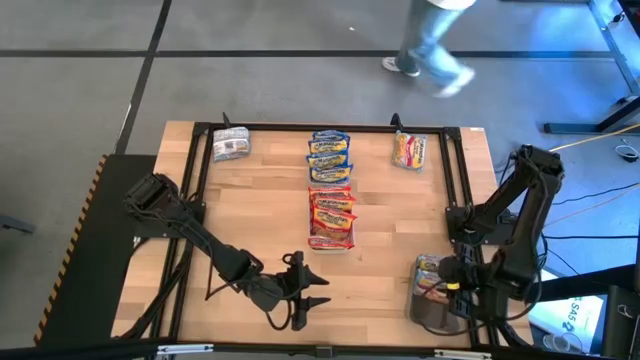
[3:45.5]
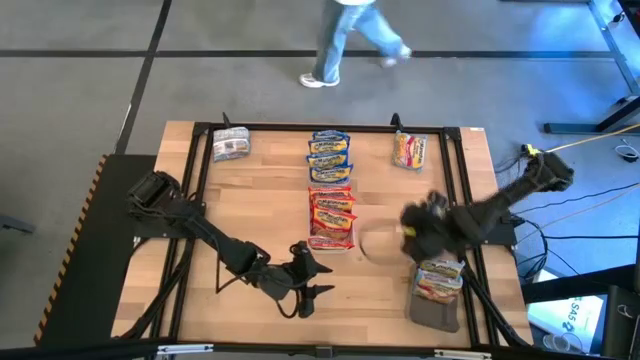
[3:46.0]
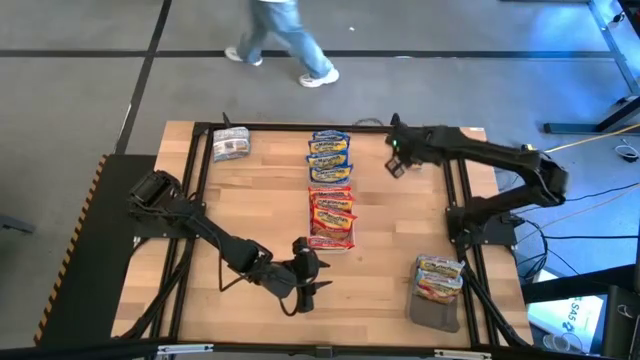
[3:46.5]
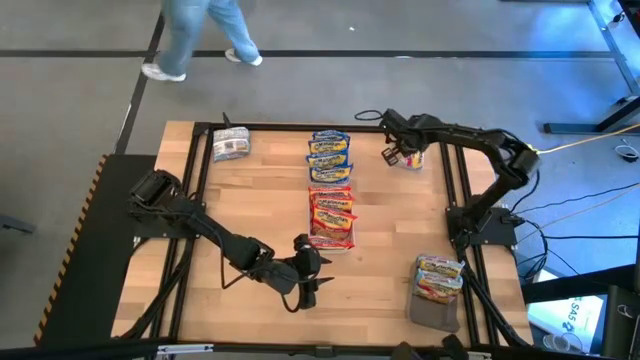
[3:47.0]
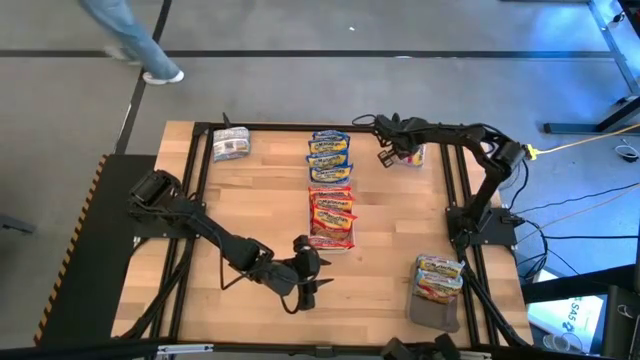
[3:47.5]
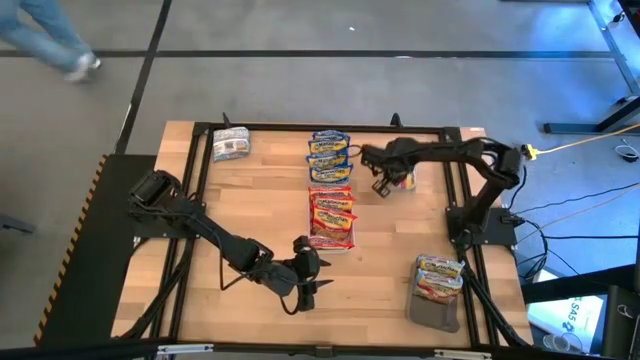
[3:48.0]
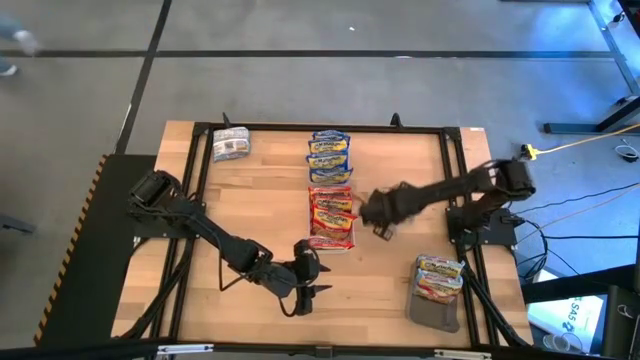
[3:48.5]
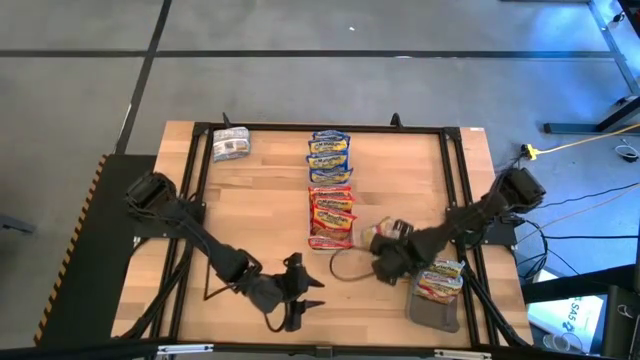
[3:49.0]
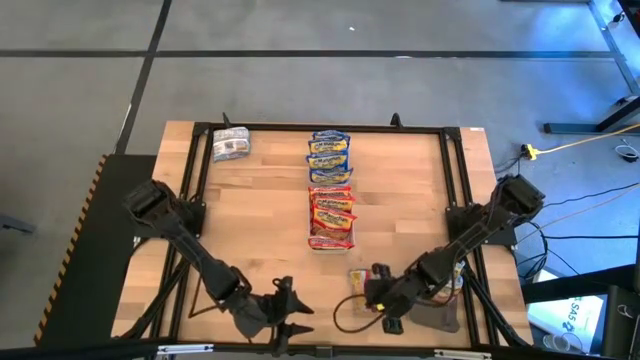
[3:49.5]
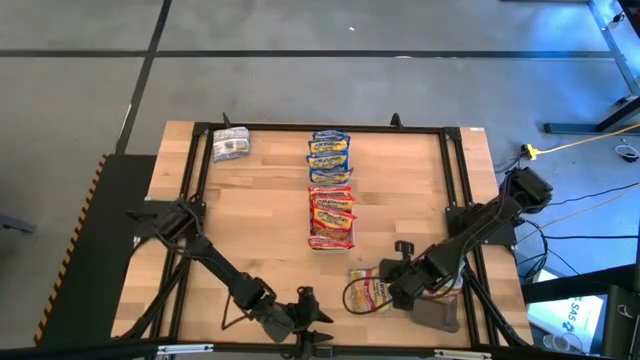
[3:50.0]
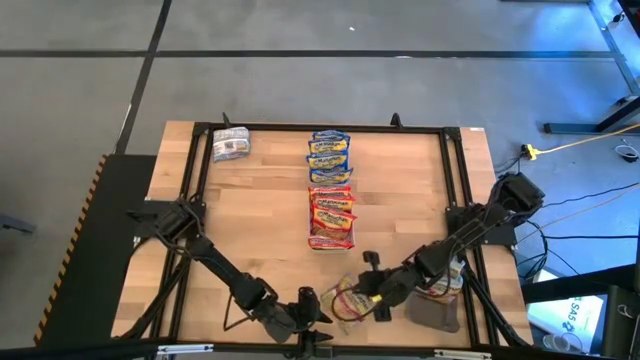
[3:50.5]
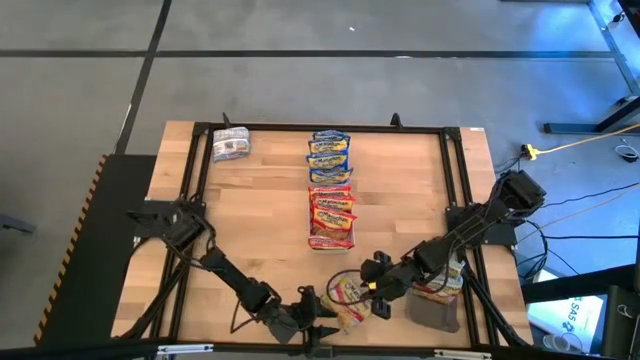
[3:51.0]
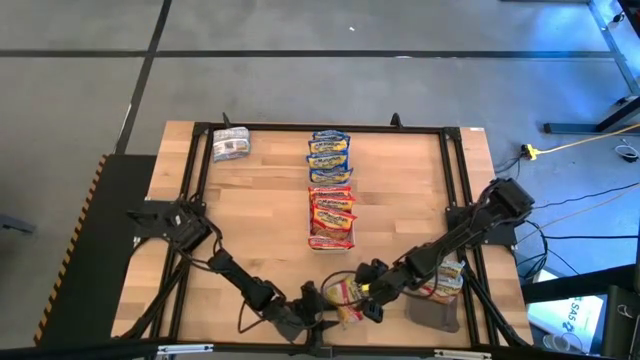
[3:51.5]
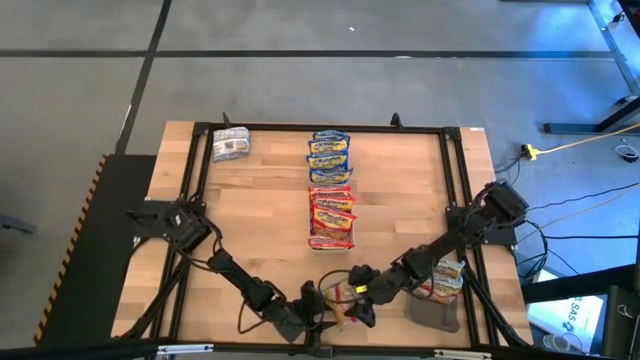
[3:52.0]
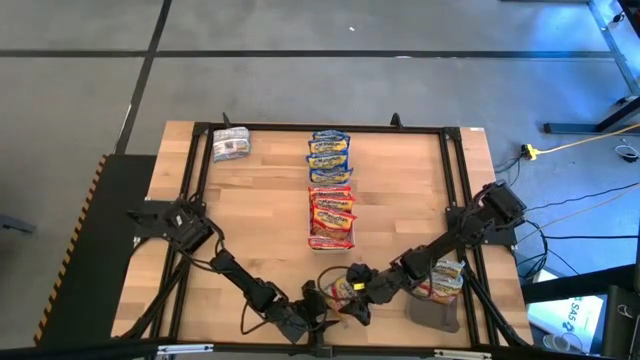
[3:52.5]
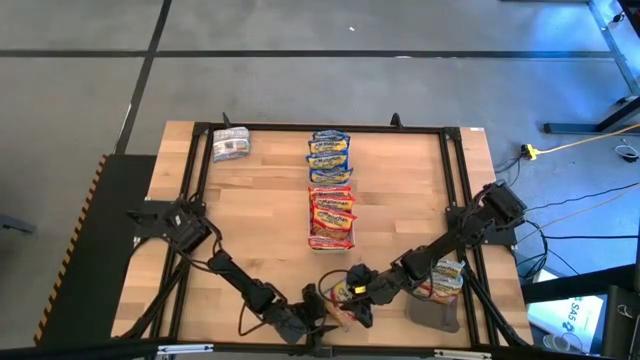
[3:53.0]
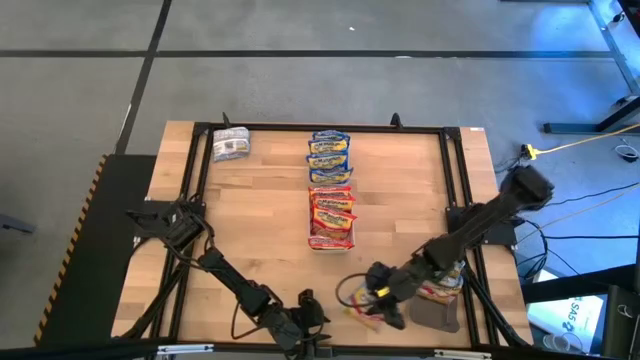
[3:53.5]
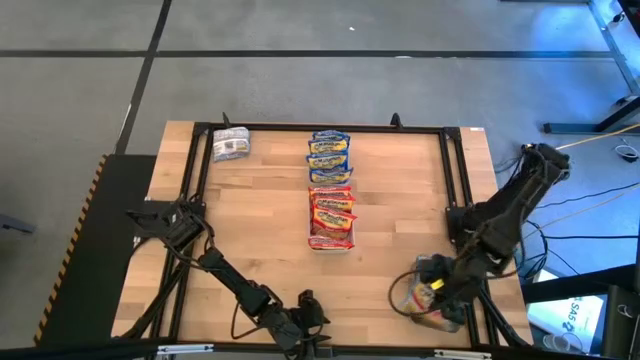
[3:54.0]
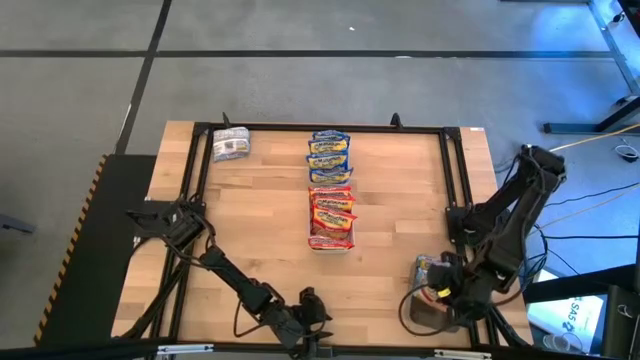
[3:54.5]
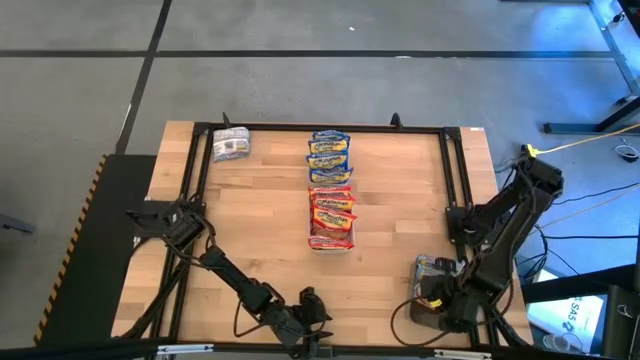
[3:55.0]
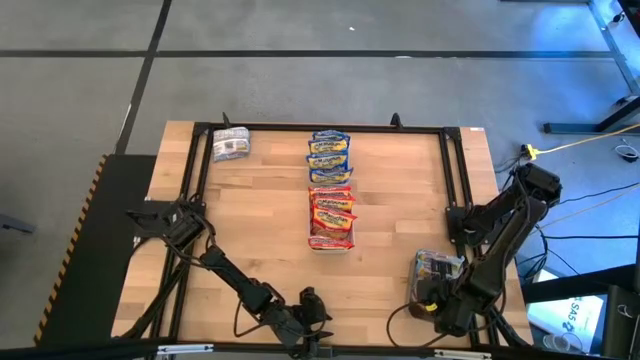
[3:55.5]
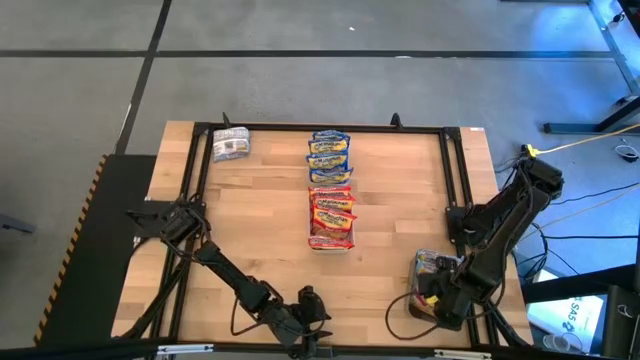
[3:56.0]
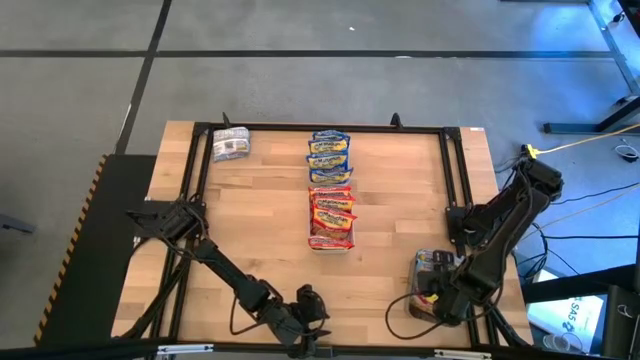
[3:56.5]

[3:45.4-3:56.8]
Task: Sort Maruchan noodles
Put the light blue noodle pack into the black bin

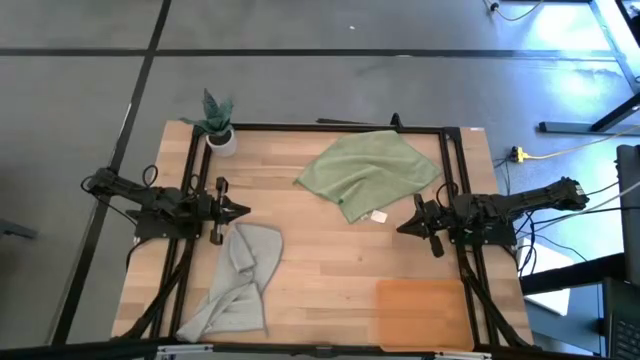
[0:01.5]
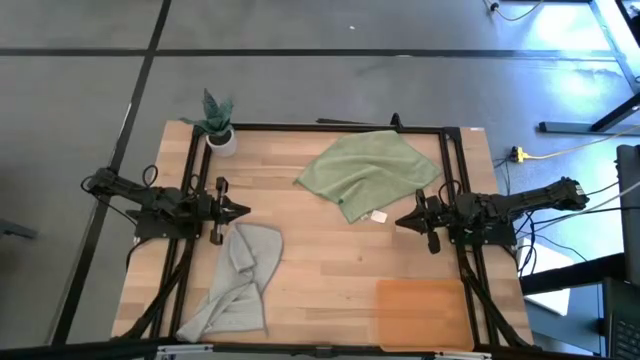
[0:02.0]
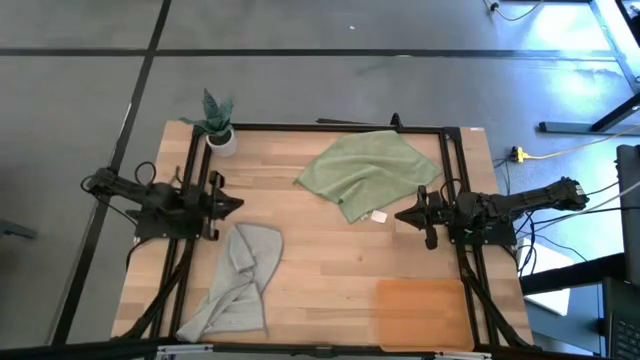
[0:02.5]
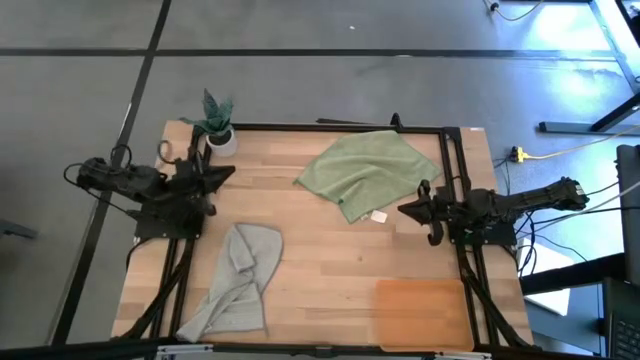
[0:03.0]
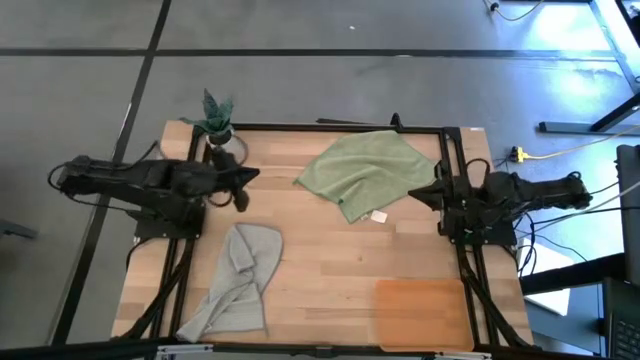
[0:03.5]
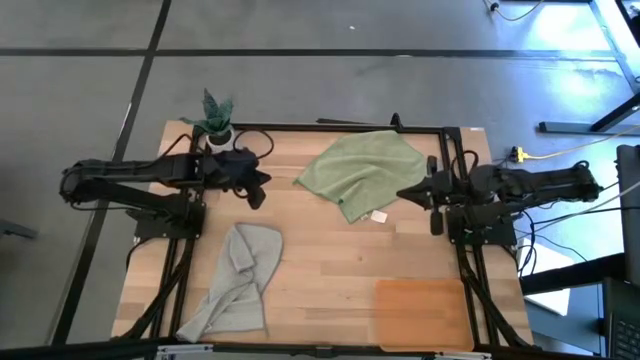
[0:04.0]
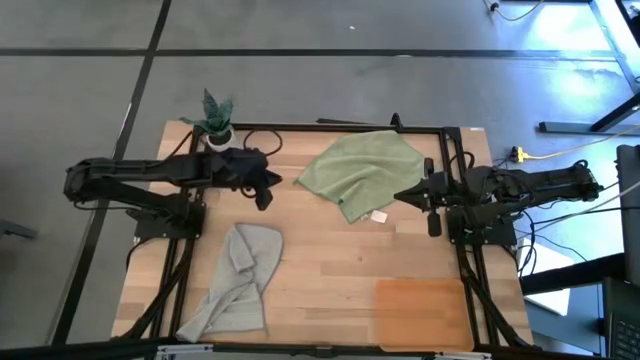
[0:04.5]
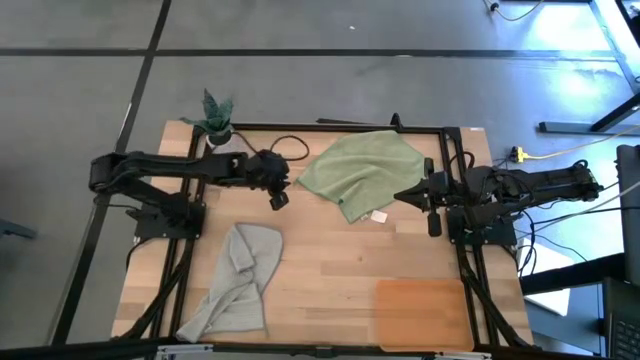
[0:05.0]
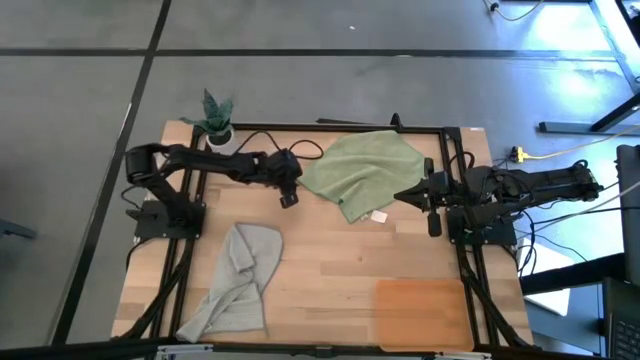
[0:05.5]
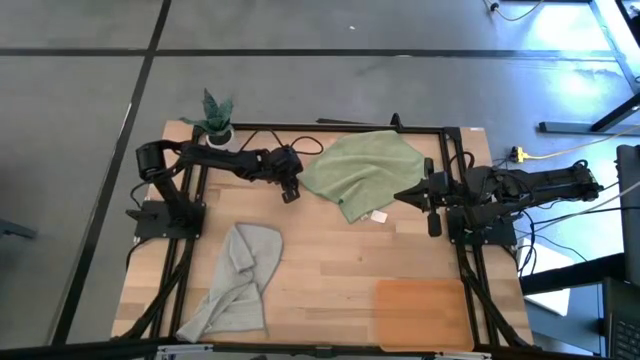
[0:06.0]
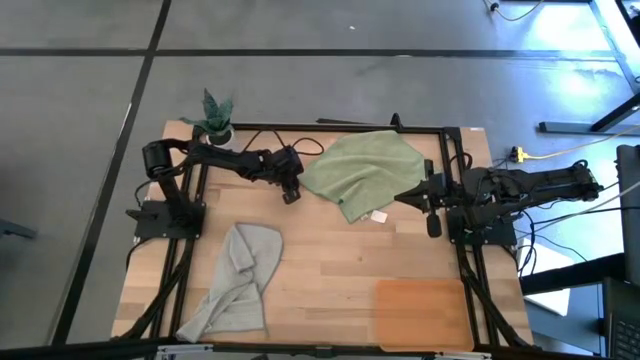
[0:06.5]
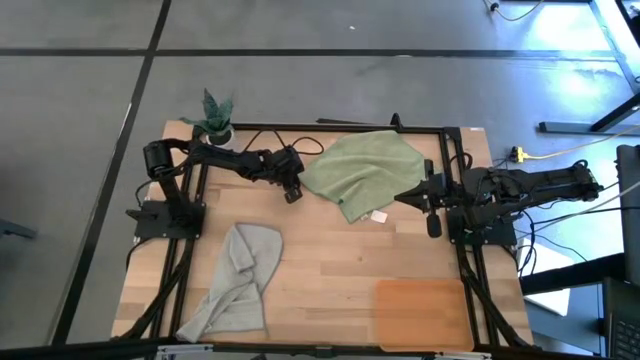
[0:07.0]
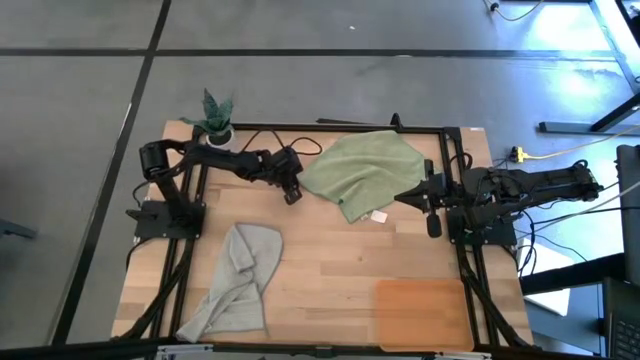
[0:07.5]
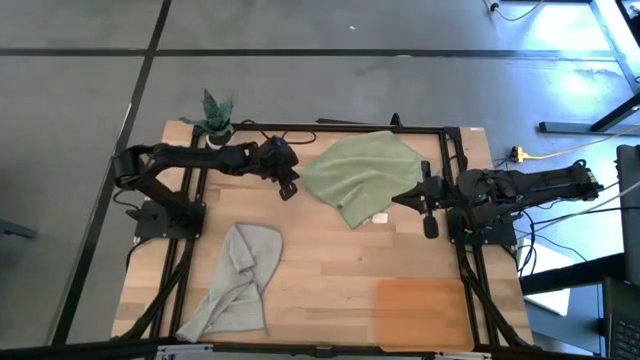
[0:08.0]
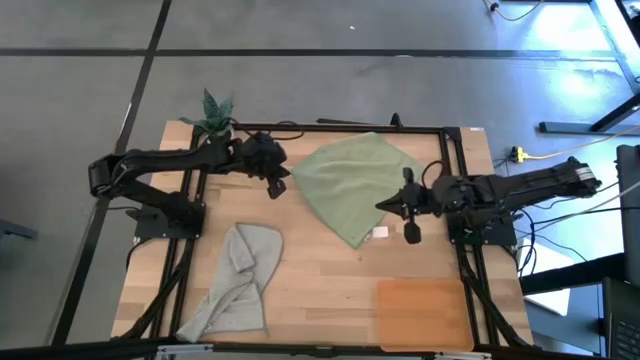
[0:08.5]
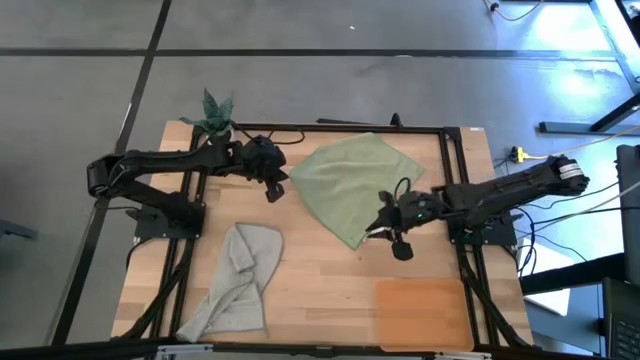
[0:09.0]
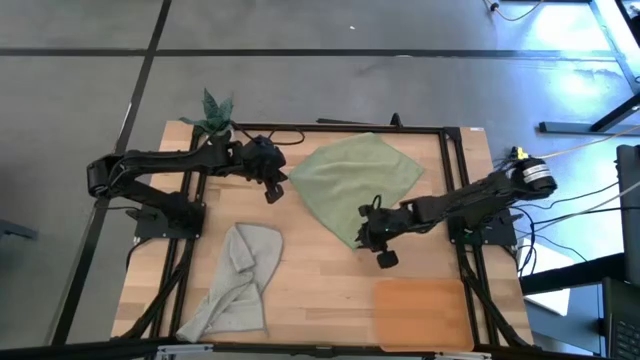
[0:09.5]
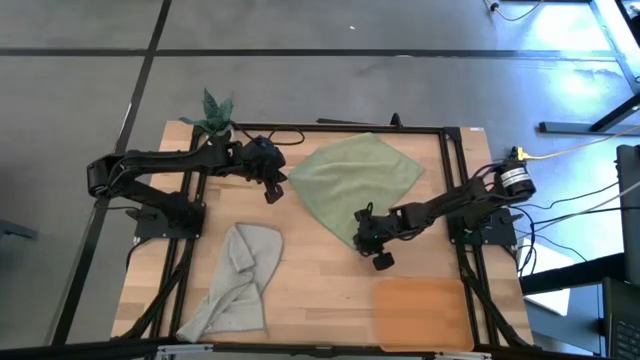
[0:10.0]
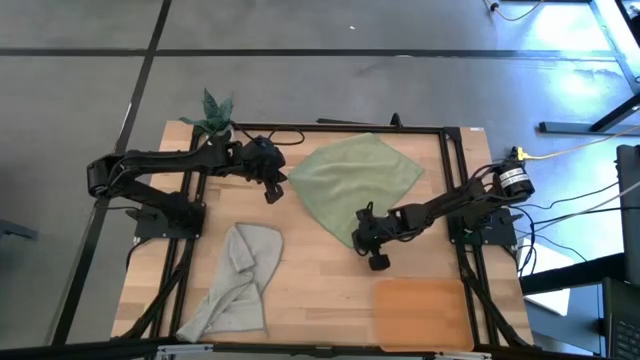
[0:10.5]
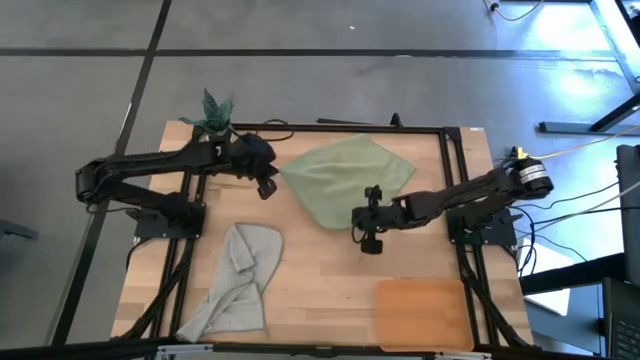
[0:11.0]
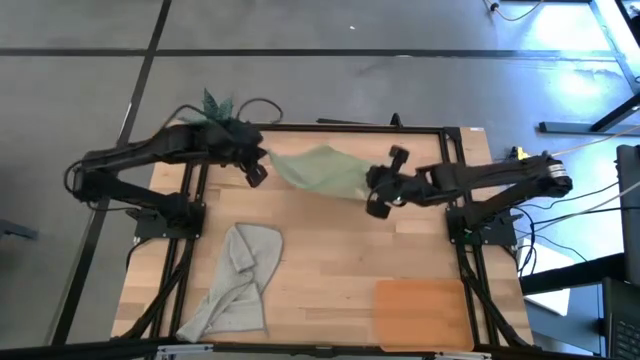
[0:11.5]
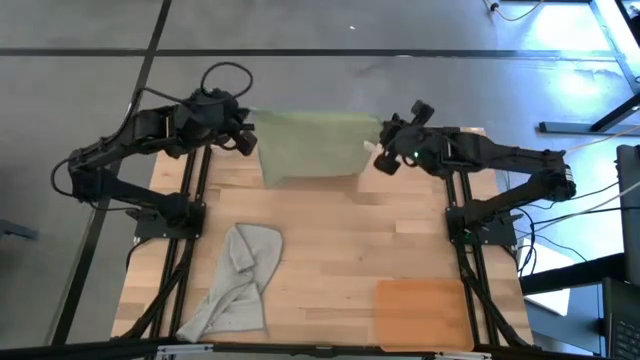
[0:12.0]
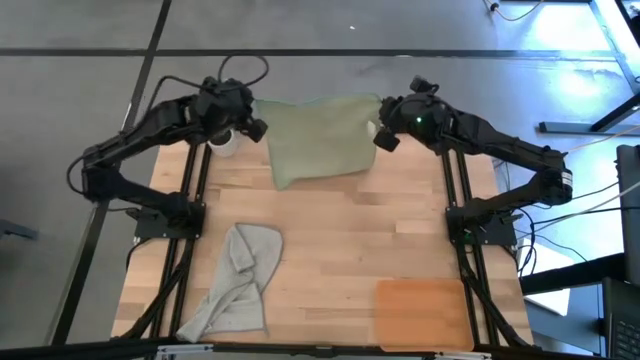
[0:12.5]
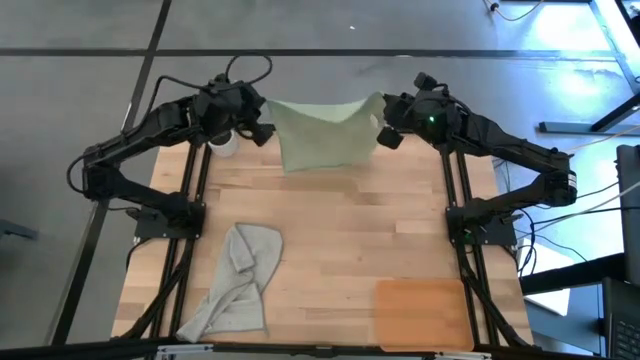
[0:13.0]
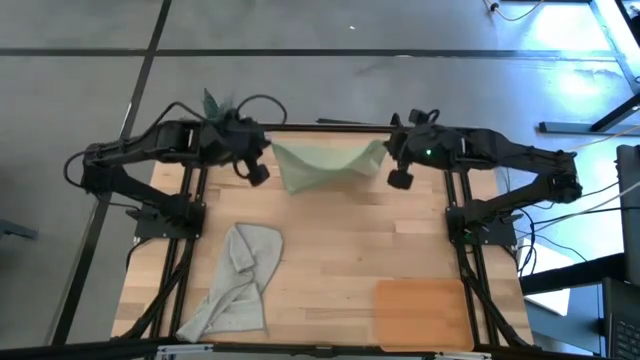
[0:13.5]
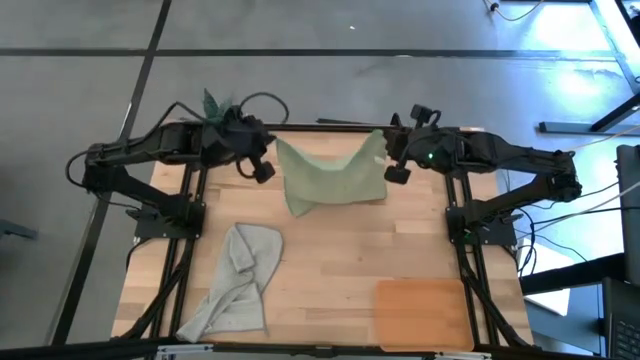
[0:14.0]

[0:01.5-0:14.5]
Task: Roll microfiber towels into tight, uniform cylinder then place into a basket
Fold the green microfiber cloth
